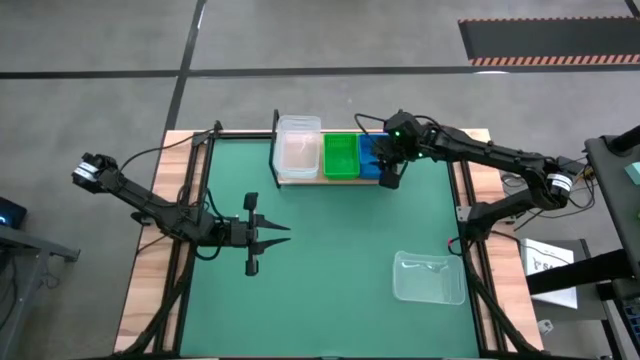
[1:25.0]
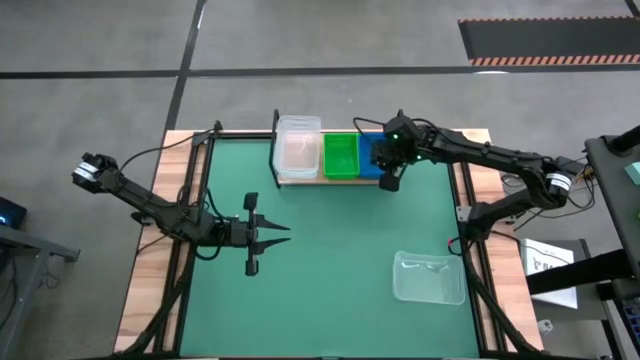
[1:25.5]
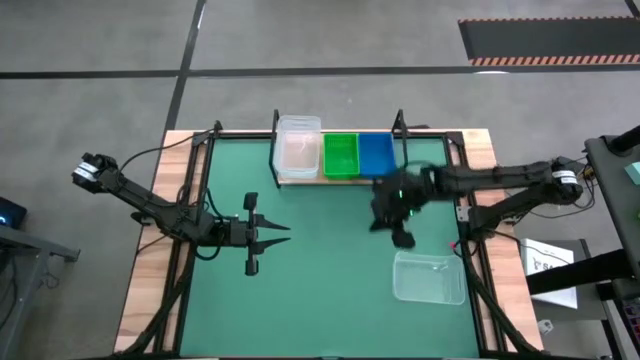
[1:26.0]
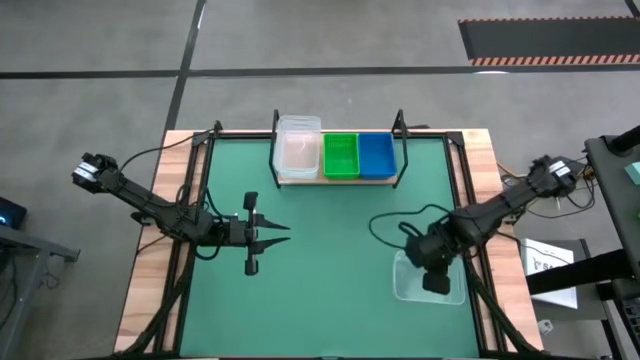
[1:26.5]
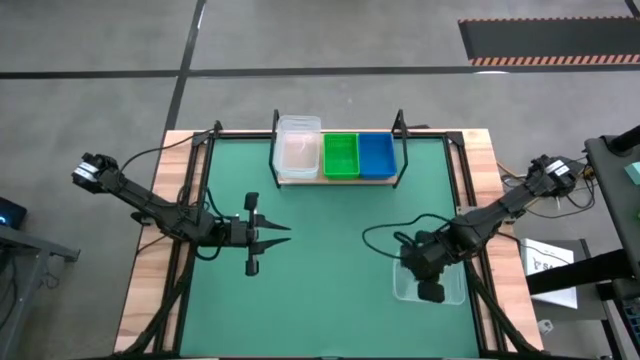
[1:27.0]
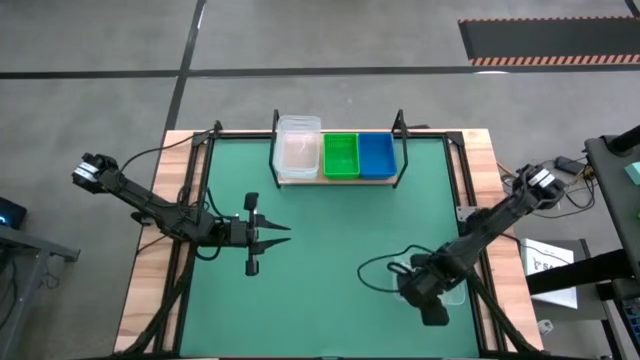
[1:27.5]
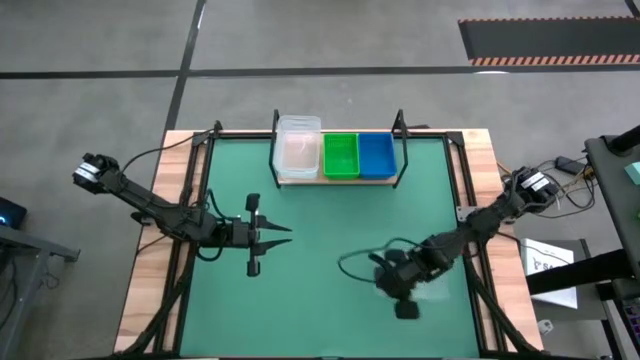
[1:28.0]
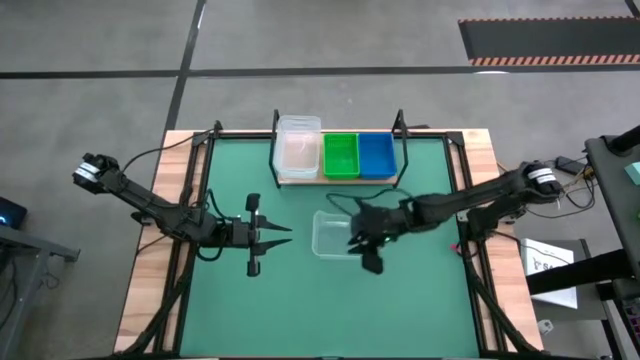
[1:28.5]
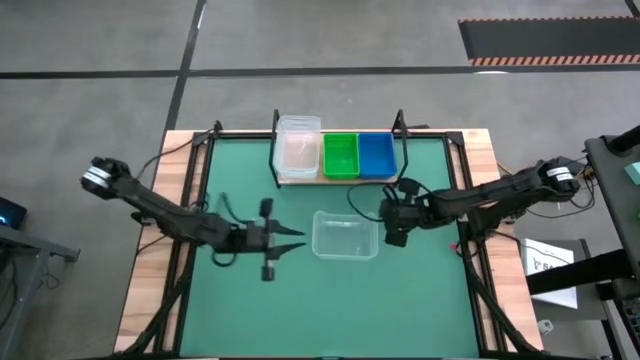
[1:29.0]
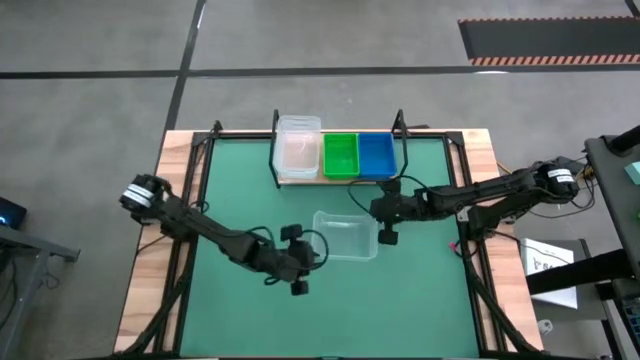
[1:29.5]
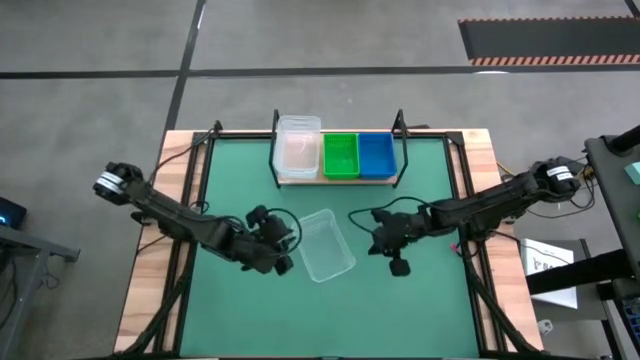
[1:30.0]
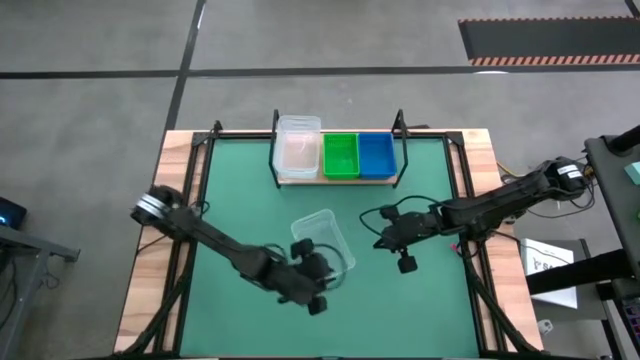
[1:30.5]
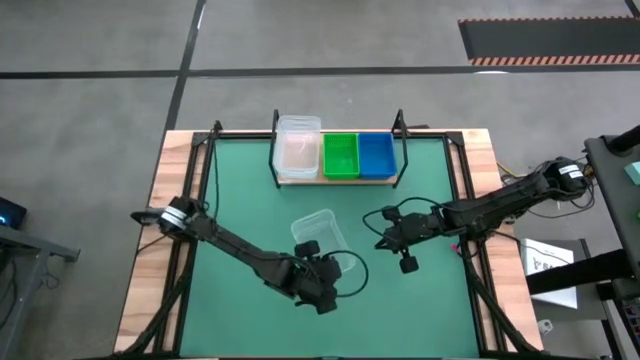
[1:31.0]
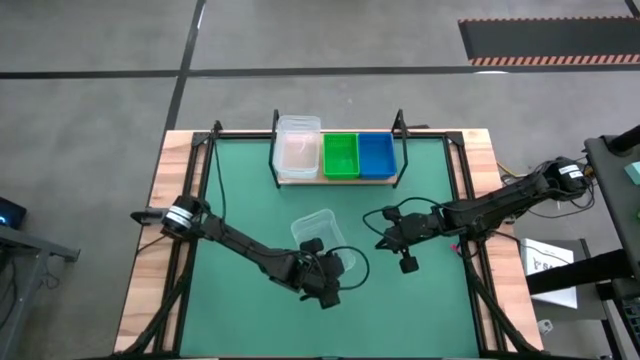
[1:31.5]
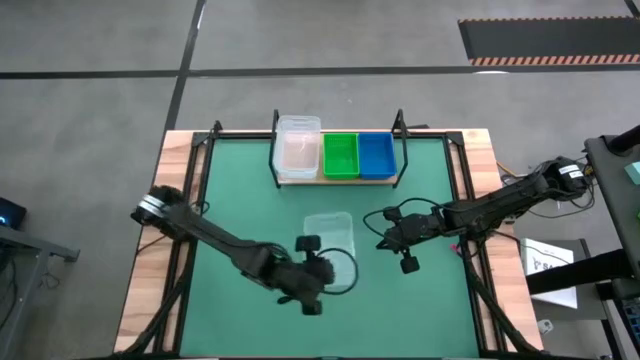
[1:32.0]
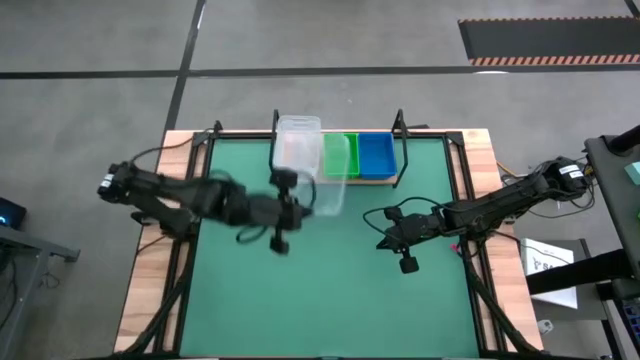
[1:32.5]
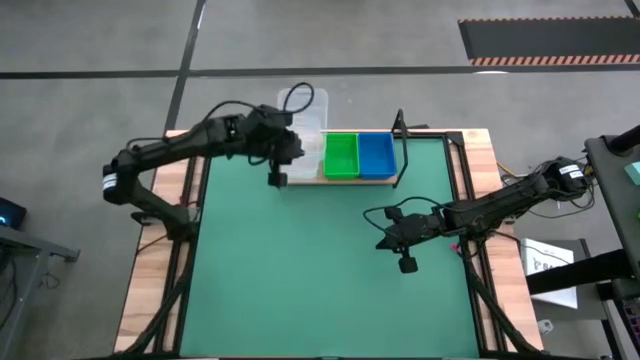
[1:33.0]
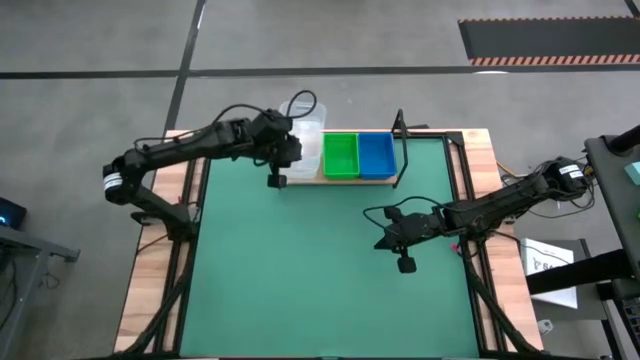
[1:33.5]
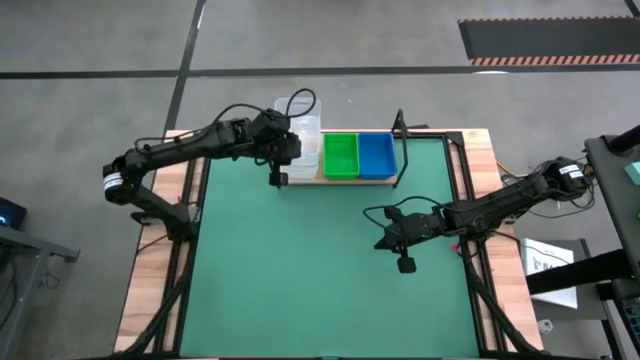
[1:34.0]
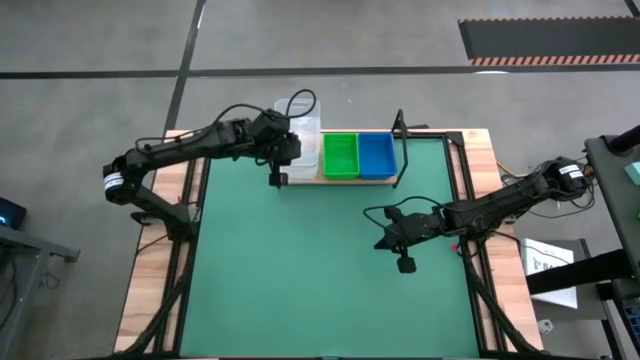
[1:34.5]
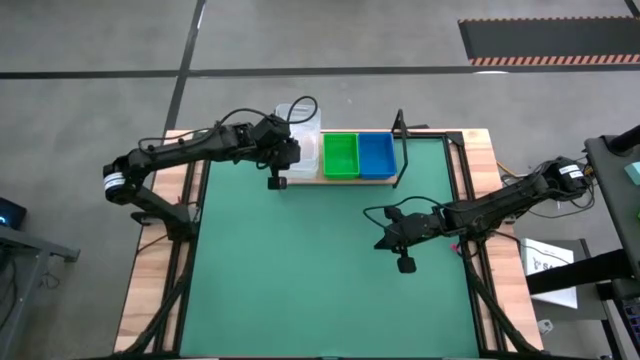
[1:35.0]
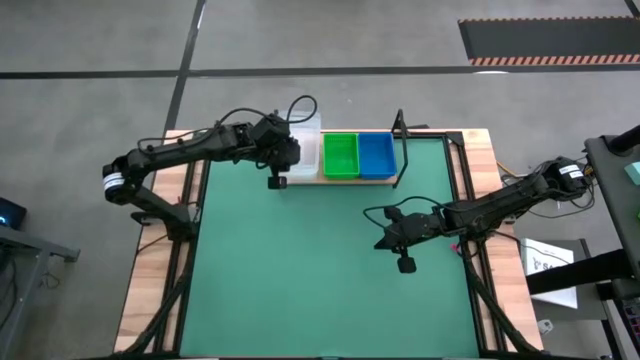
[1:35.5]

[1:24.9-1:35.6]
Task: Stack baskets on shelf by color
Stack the transparent bin on the transparent bins on the shelf

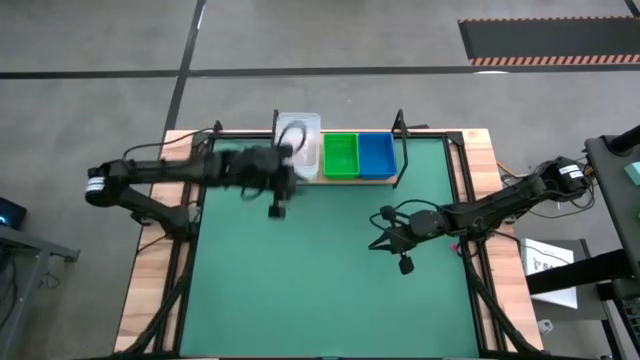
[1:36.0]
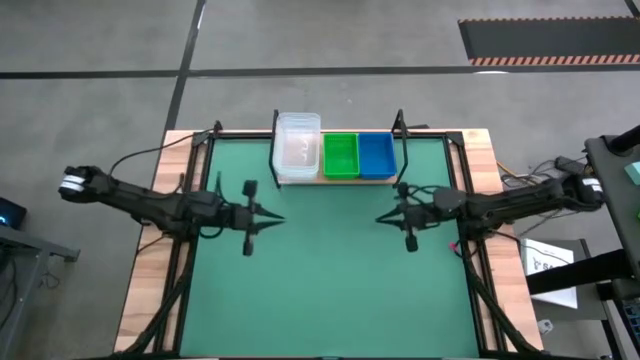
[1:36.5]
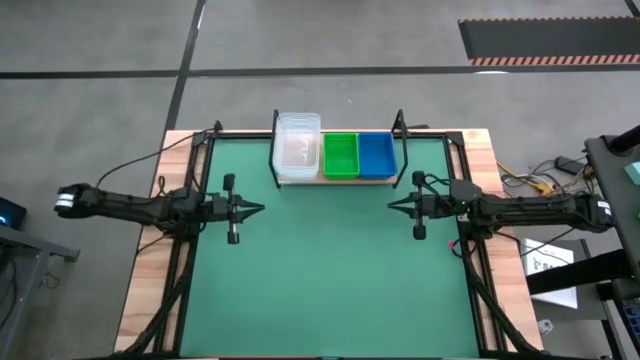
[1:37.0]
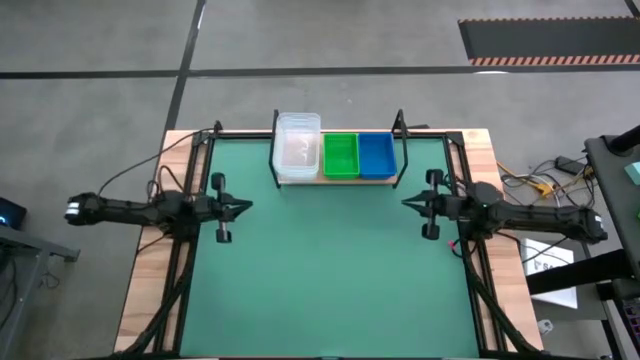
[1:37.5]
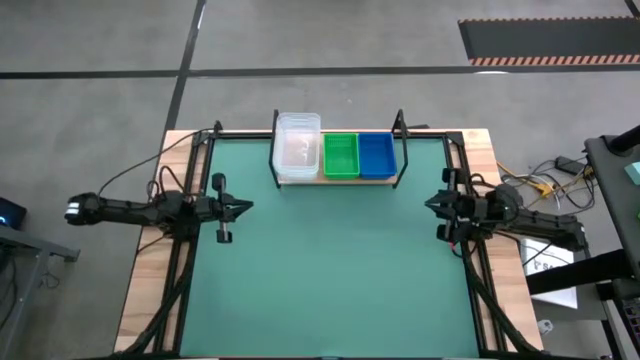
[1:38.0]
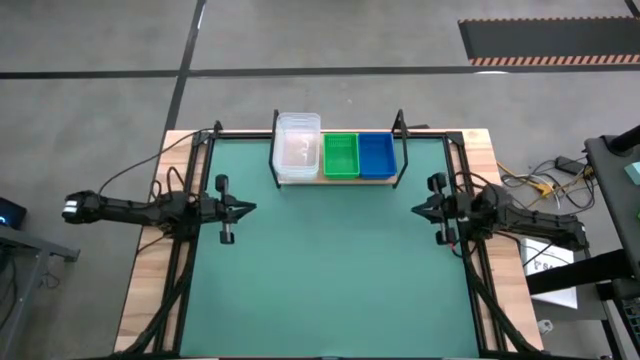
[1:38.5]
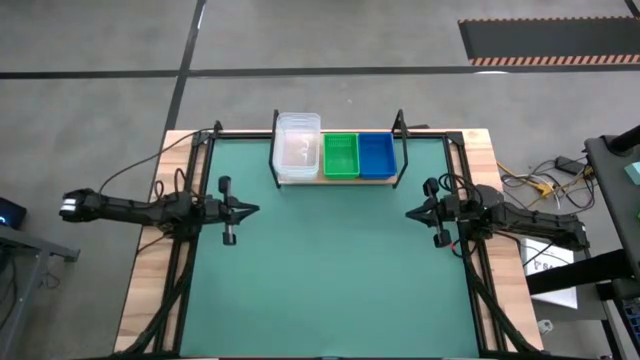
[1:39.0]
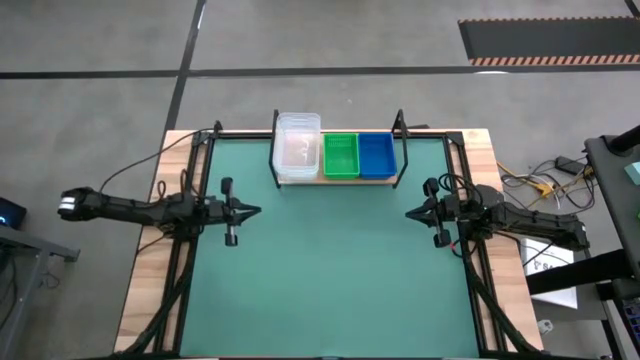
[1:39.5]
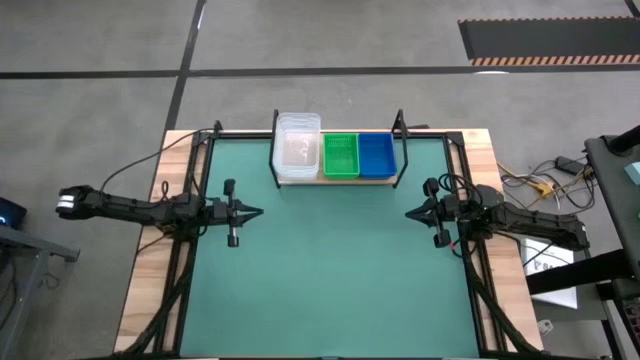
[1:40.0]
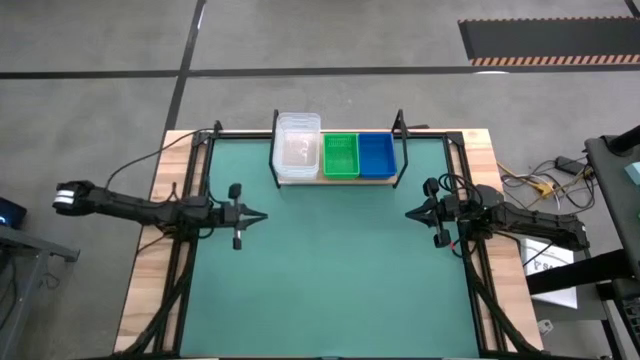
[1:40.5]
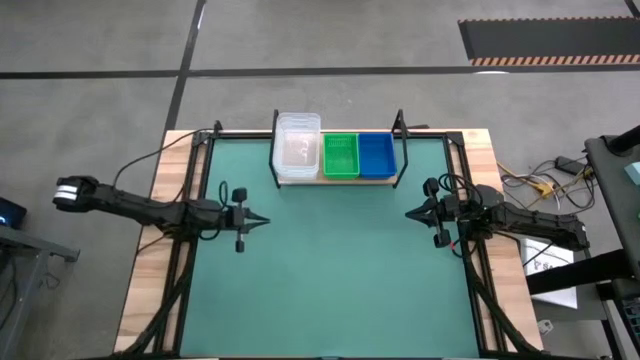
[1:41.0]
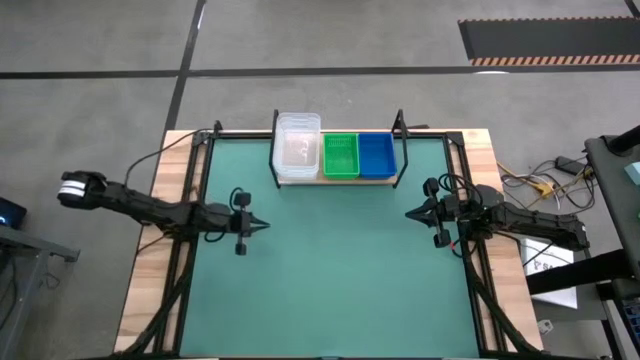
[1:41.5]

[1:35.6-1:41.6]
Return to Home Position

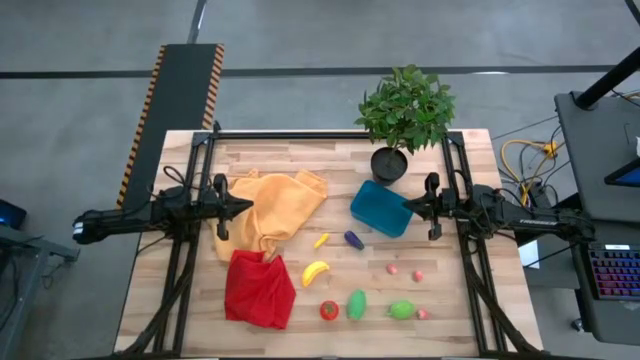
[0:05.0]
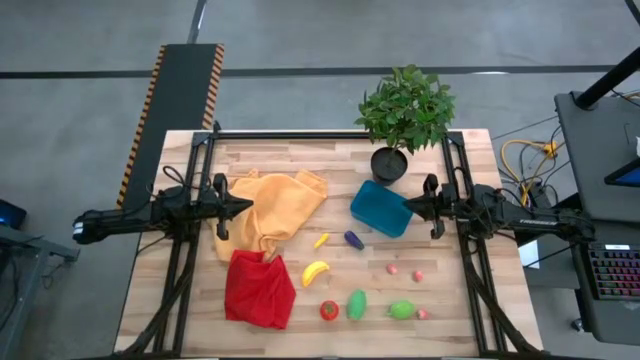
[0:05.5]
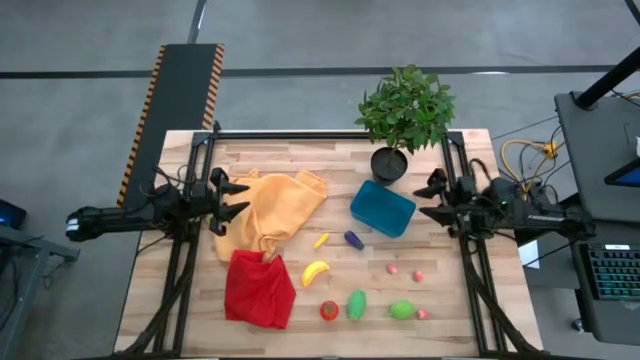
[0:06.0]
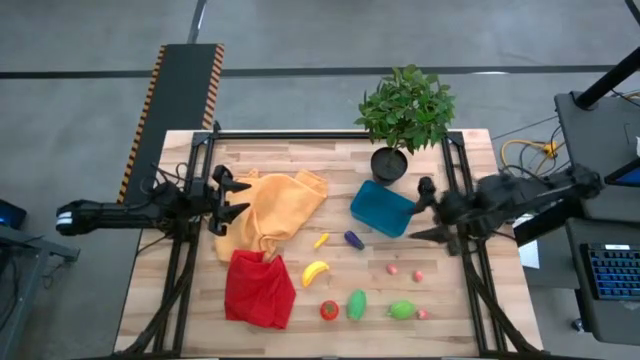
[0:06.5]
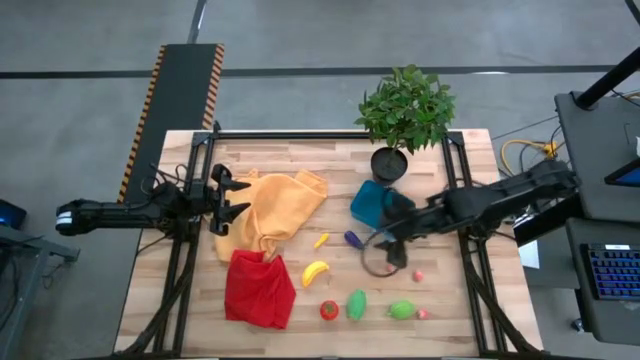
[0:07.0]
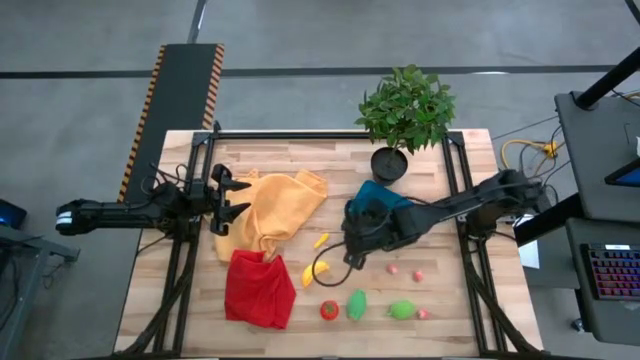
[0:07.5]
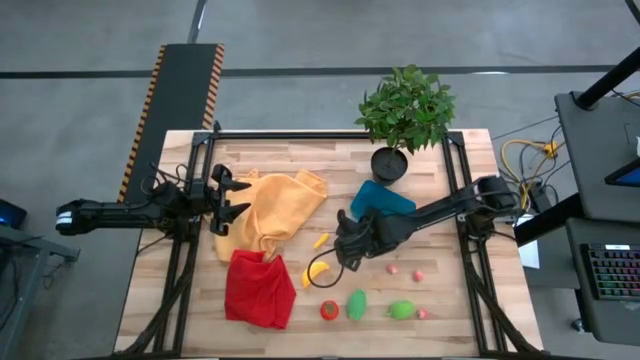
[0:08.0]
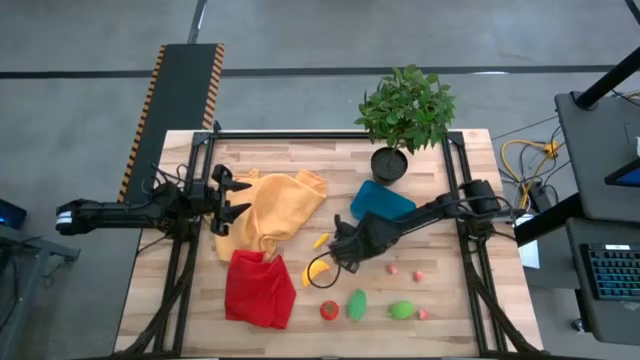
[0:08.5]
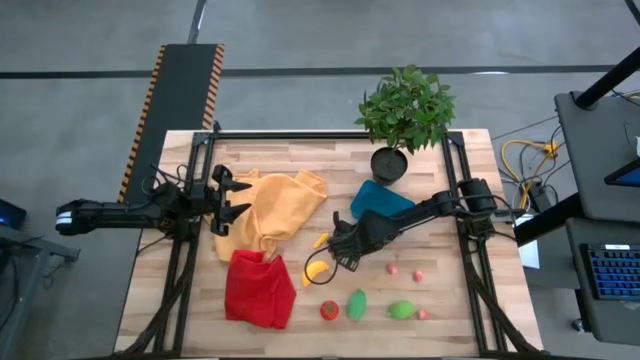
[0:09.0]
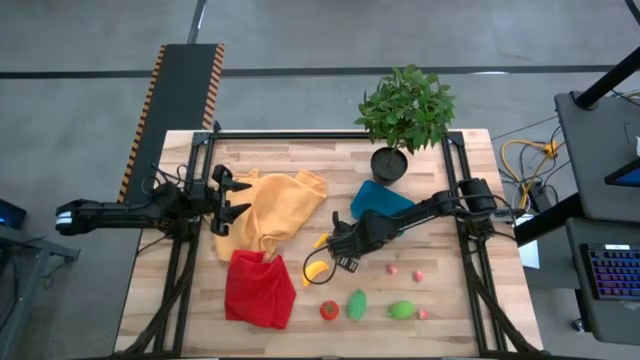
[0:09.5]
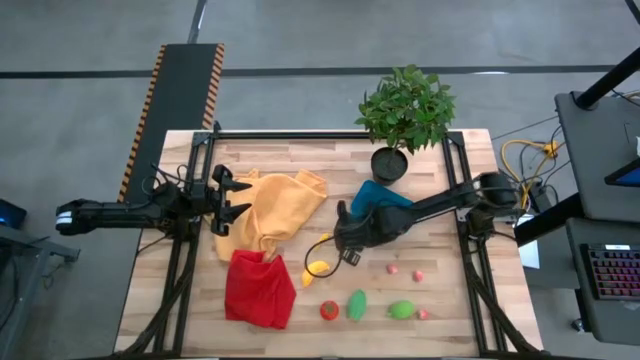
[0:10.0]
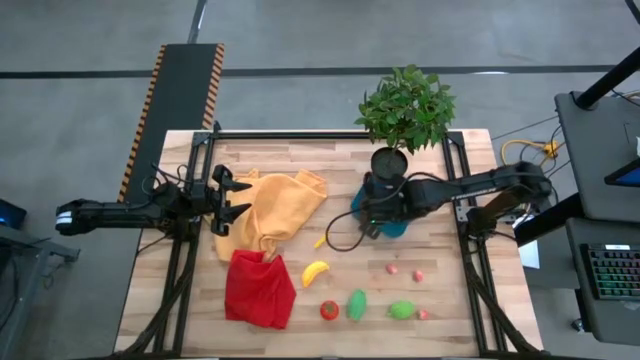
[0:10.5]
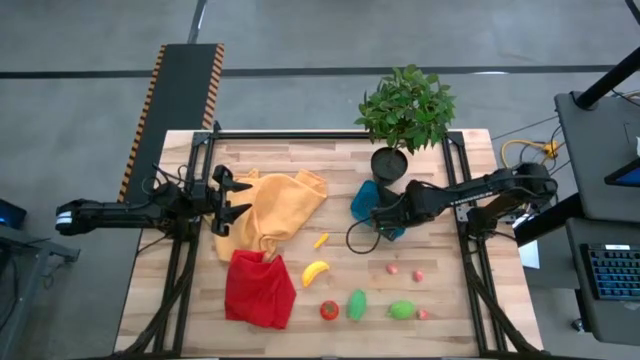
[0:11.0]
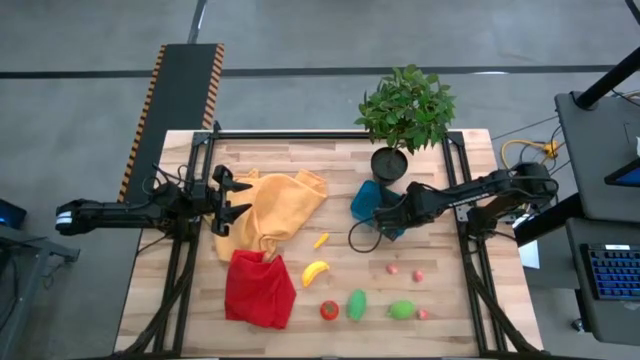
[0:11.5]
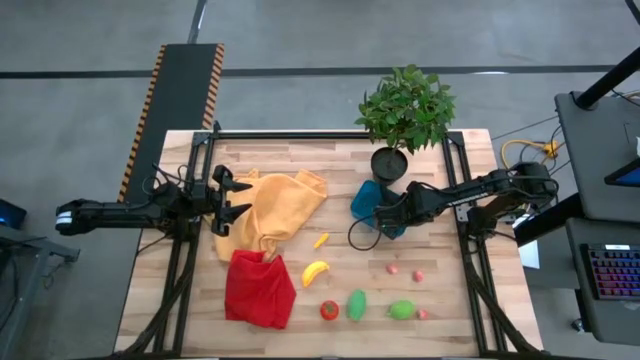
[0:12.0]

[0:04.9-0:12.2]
Task: Pick and placing Produce into tupperware
Put the eggplant into the blue bin
